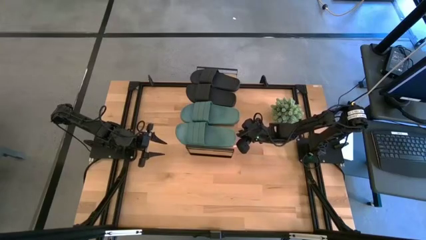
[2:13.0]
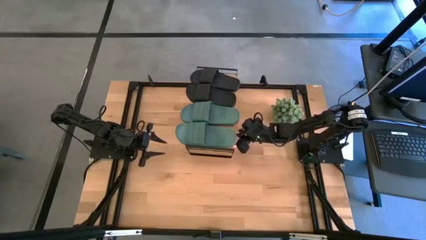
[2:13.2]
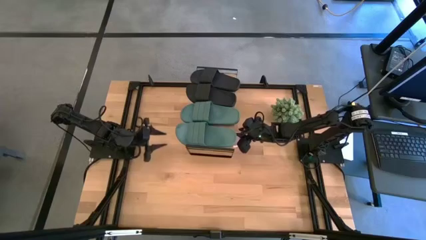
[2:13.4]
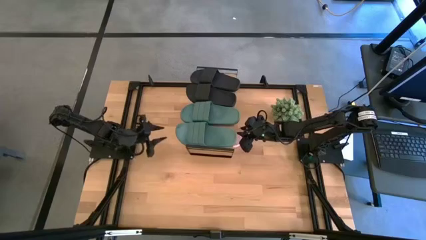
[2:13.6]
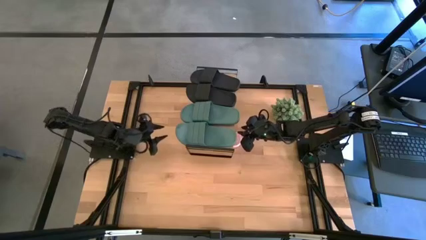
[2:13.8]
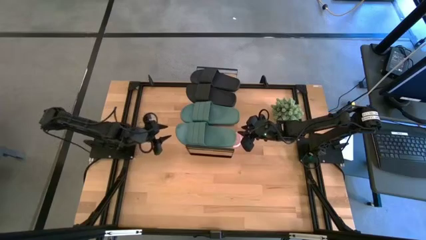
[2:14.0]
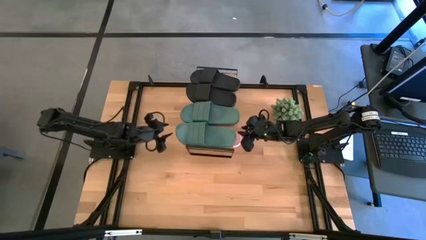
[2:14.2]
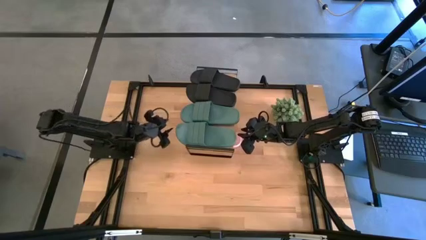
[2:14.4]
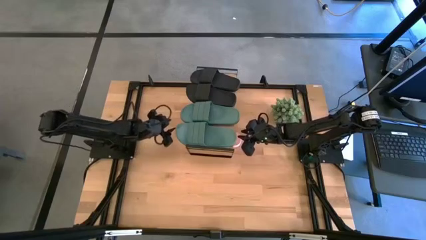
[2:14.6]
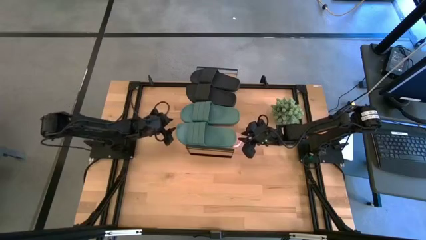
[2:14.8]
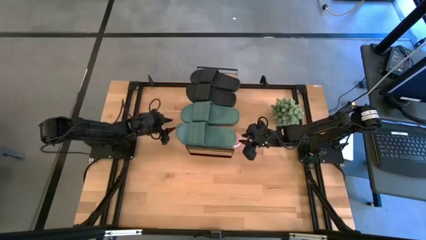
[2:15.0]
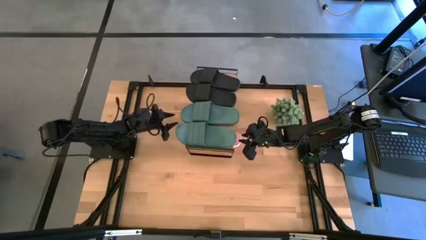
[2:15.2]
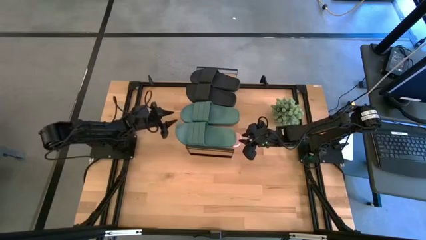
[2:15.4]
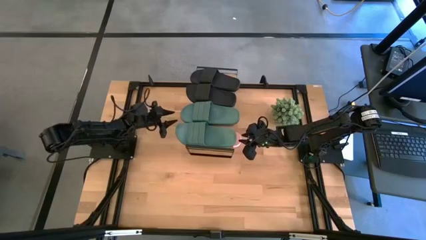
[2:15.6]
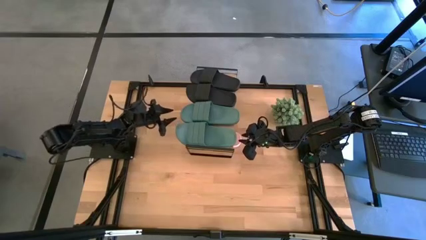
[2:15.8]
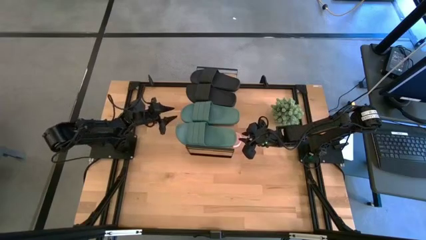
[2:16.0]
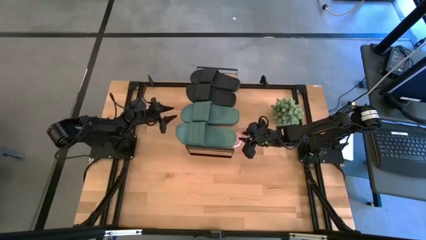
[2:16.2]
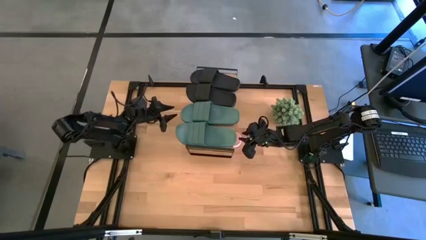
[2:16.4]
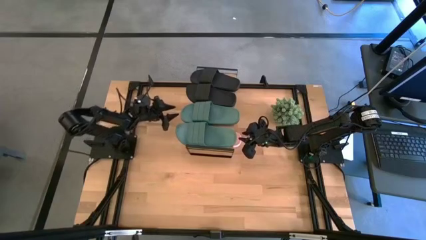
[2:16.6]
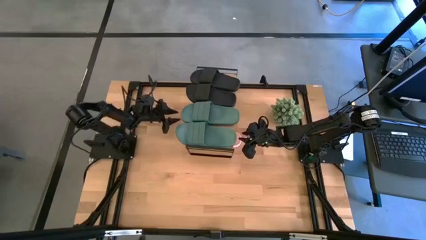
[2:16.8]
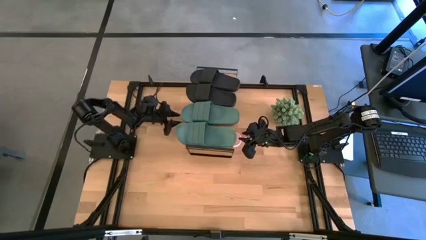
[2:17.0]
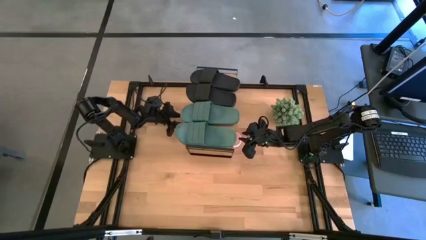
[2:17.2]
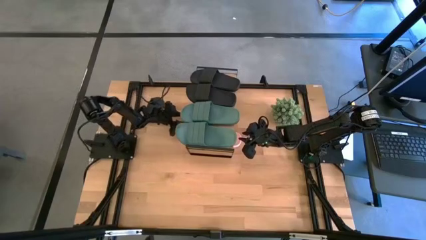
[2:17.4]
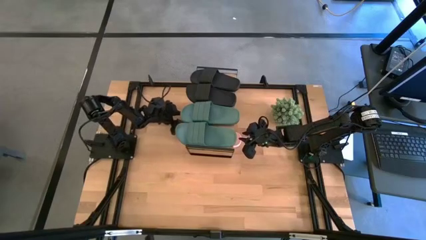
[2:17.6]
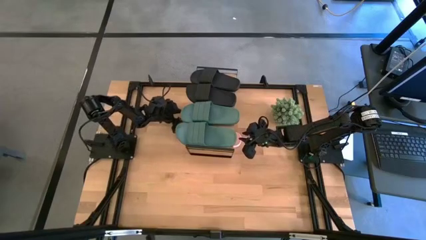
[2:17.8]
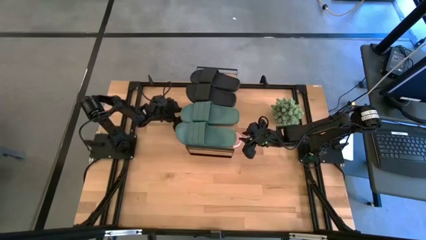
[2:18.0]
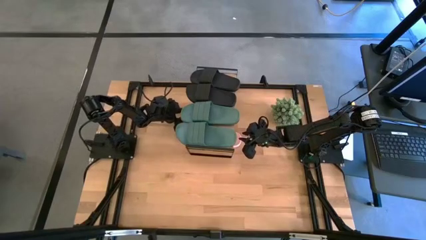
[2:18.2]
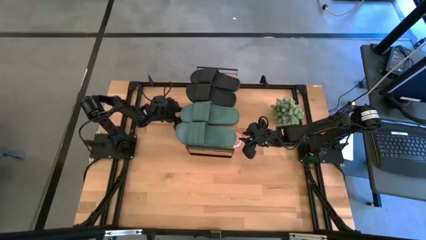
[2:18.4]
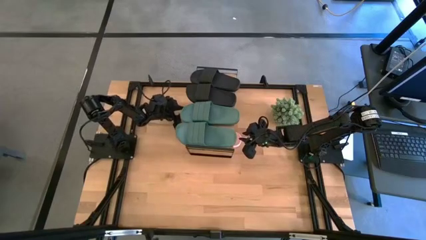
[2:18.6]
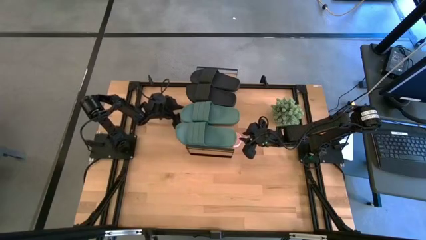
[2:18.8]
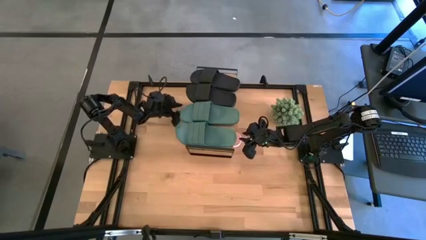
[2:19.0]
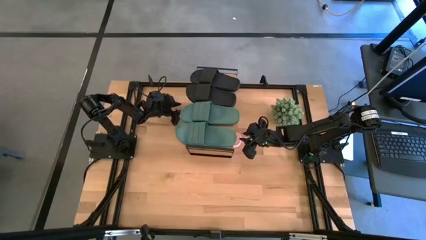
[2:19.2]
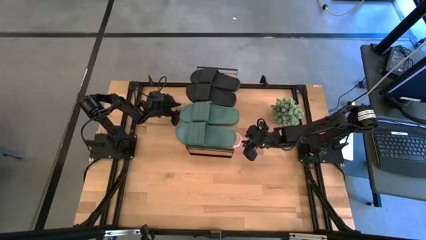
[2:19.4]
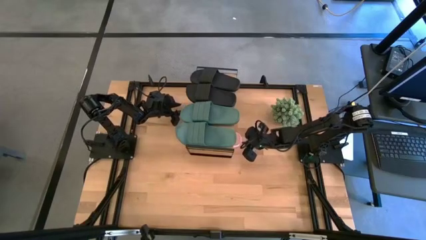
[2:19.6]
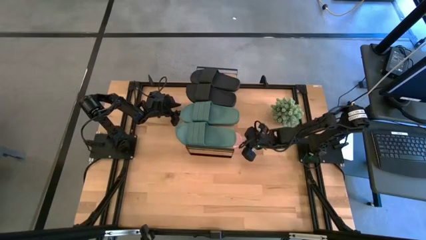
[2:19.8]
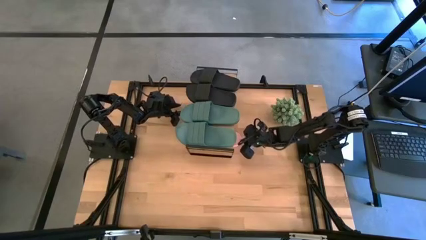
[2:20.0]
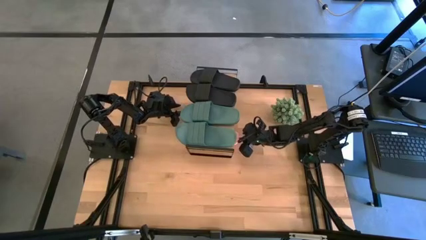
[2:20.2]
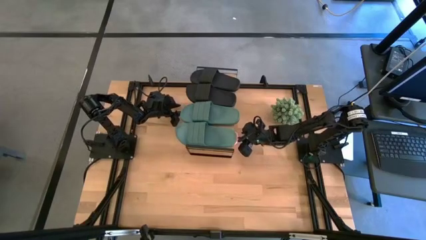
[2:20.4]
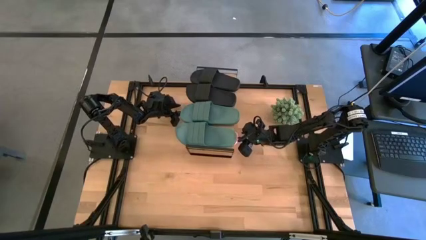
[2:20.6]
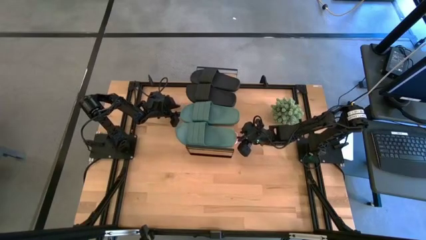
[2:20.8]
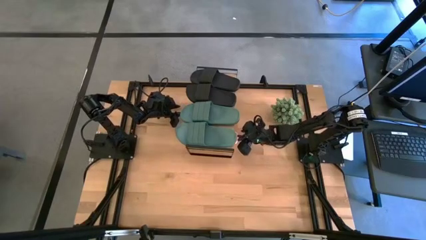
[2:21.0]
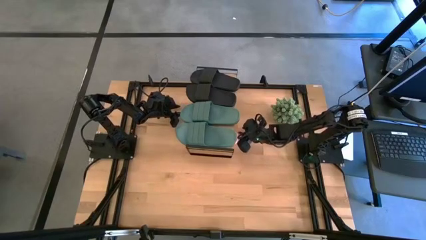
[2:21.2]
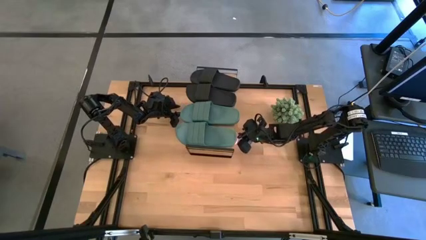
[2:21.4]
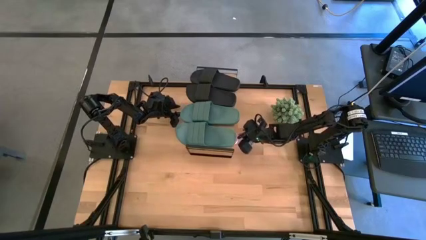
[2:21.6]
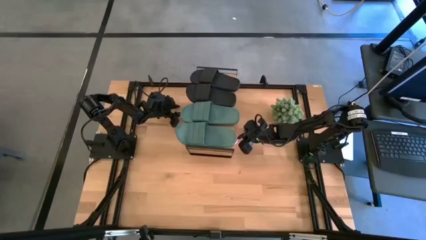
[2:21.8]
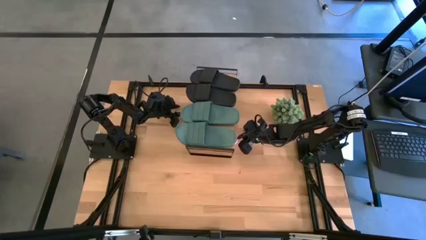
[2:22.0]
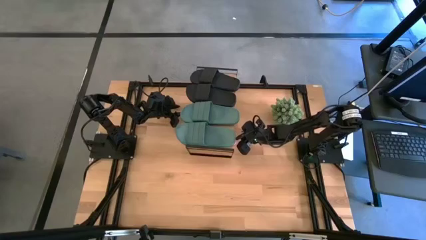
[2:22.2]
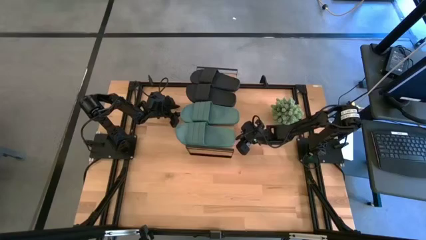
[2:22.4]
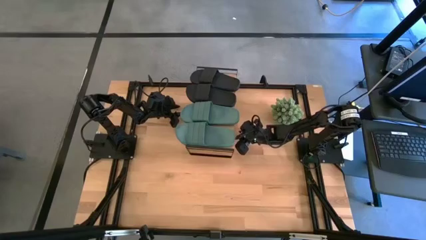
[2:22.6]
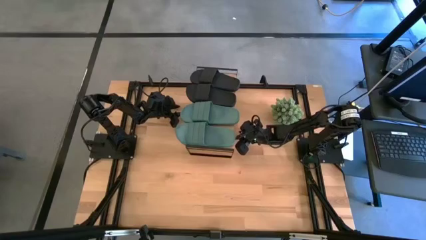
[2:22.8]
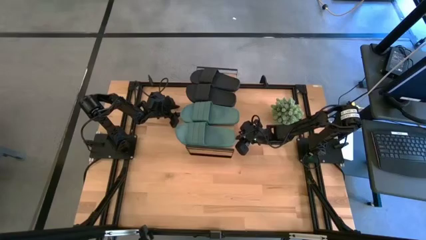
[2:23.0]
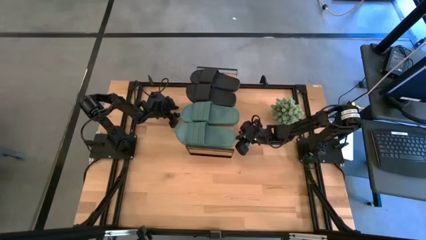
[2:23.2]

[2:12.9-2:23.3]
Task: Pick and place slides into the shelf
Adjust the pink slippers under the shelf

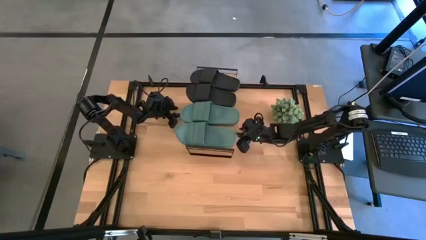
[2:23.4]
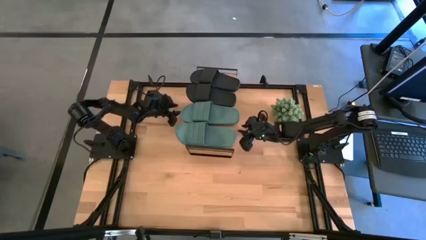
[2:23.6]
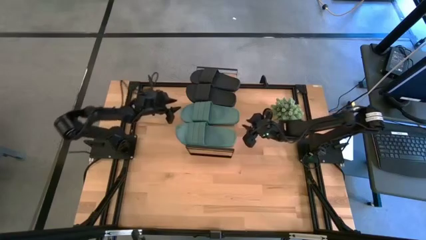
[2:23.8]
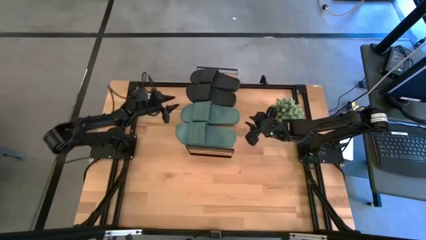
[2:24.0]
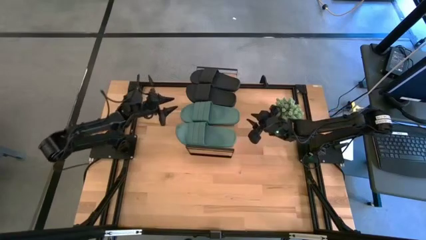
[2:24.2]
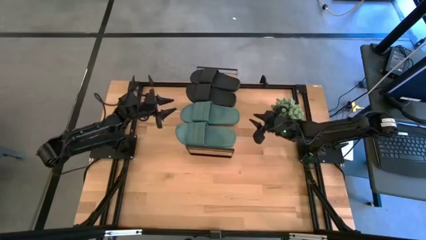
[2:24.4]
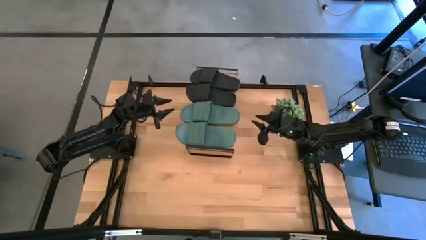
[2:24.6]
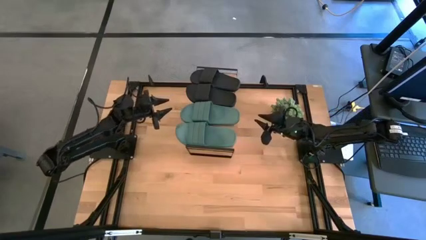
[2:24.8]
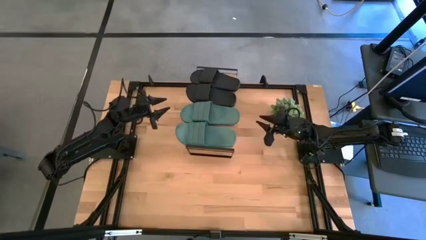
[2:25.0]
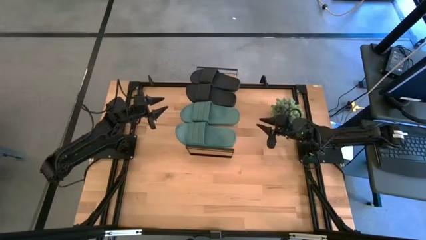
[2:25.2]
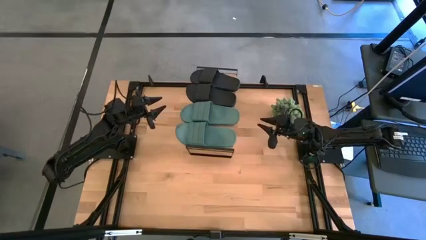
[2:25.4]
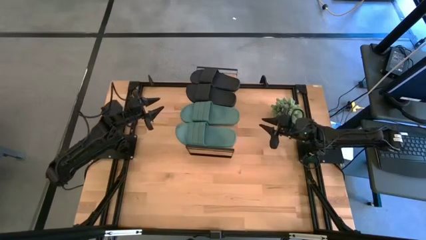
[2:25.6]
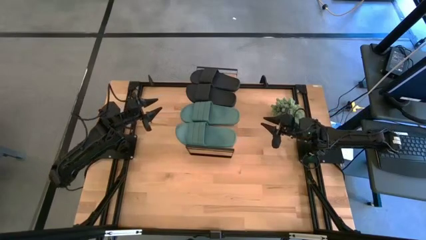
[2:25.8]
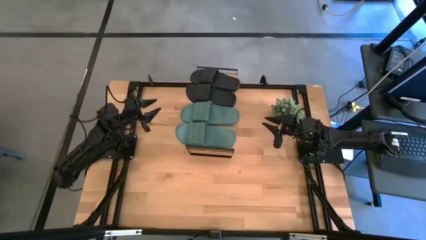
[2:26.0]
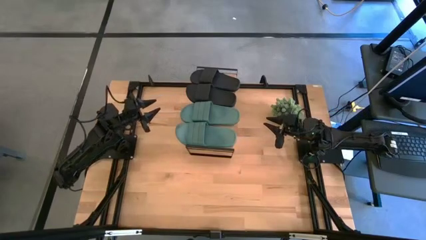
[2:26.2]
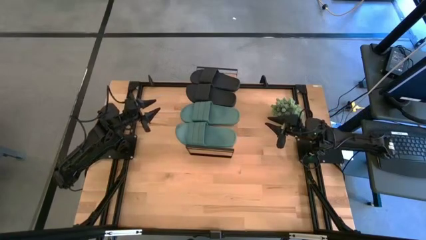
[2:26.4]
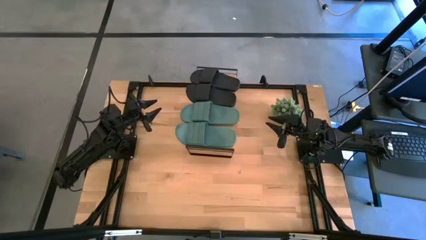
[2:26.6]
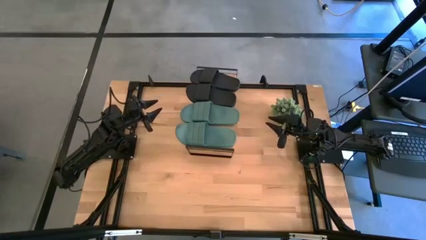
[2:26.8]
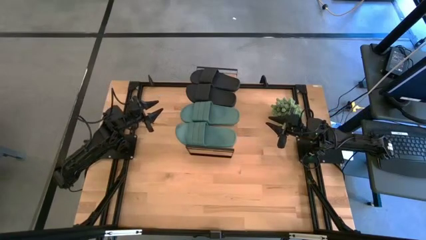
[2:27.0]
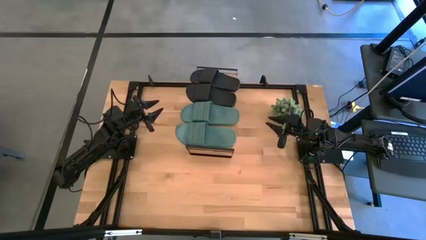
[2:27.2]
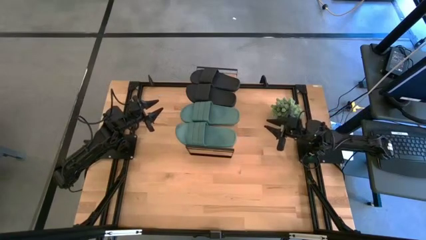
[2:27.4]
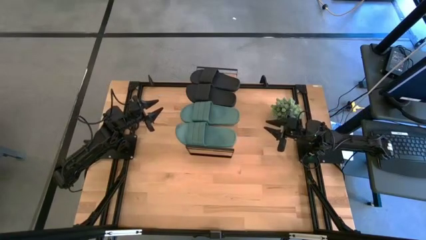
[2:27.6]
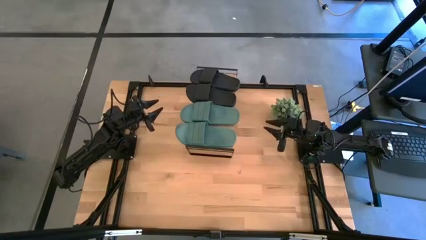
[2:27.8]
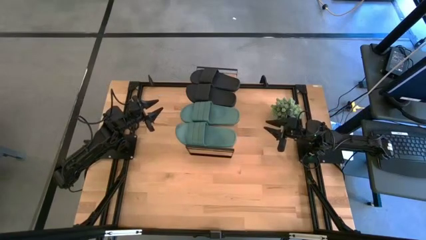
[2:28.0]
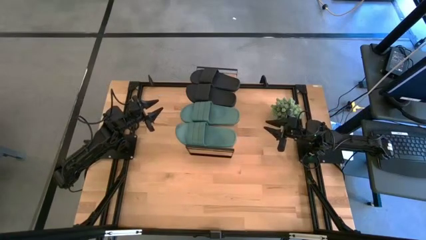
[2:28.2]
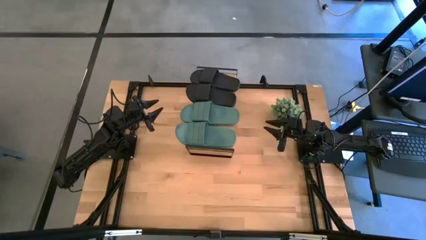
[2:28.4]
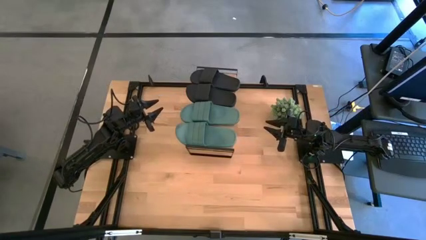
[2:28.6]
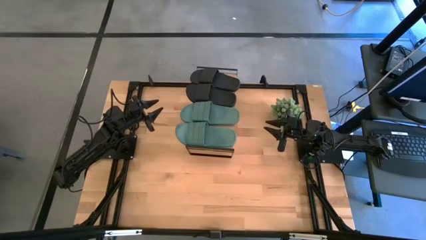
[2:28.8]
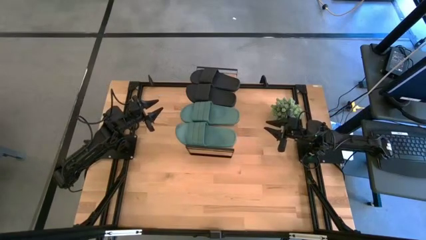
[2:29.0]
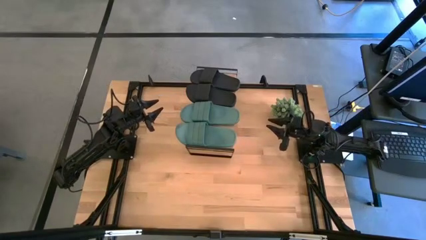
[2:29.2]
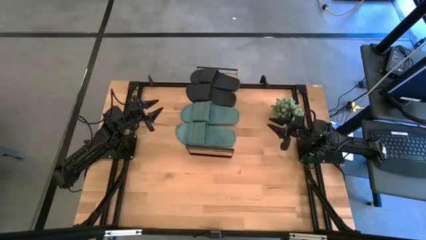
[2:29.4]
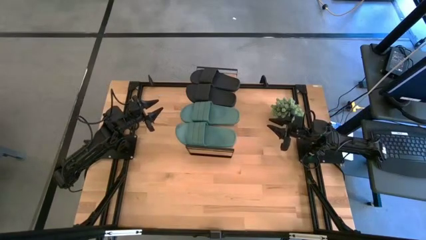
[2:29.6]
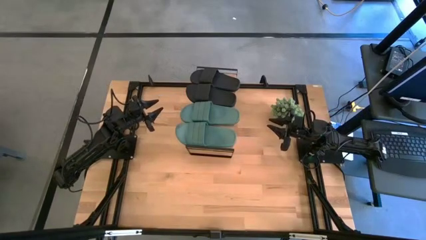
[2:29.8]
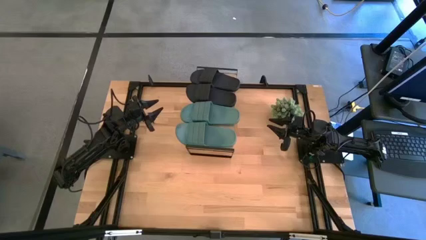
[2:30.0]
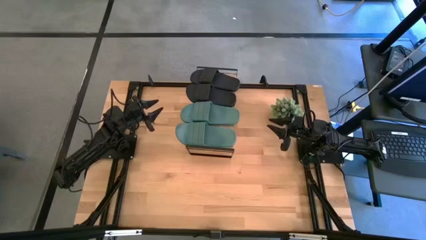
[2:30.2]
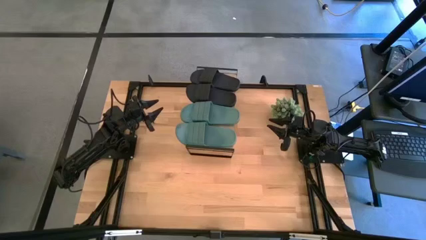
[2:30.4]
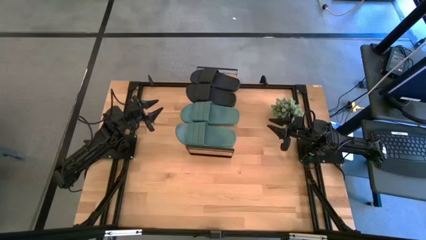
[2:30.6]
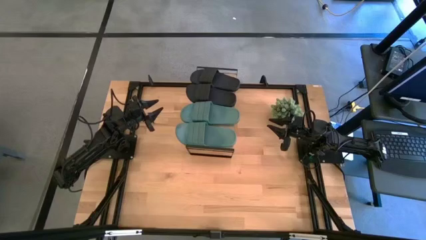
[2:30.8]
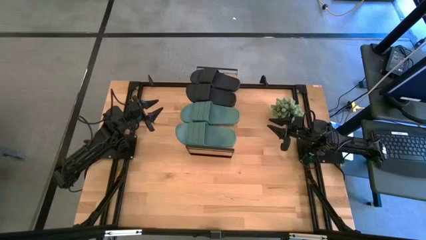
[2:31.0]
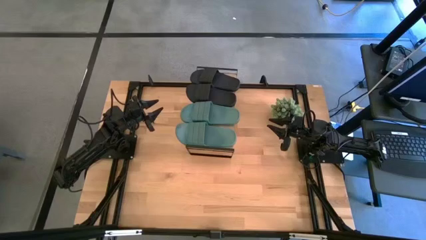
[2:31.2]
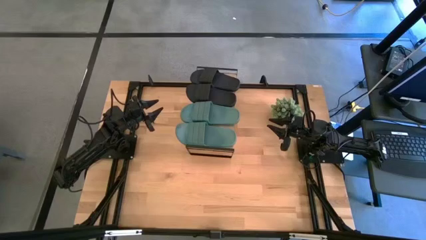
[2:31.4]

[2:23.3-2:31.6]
Return to Home Position
